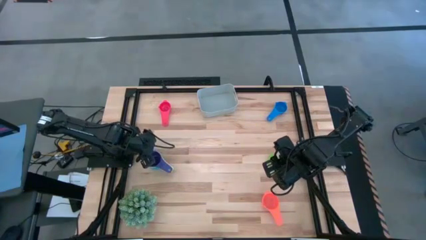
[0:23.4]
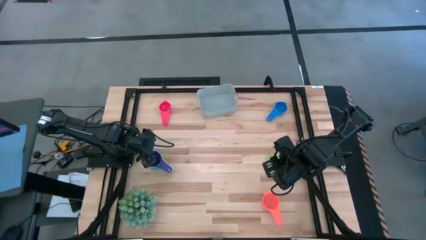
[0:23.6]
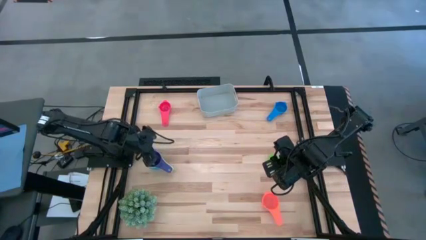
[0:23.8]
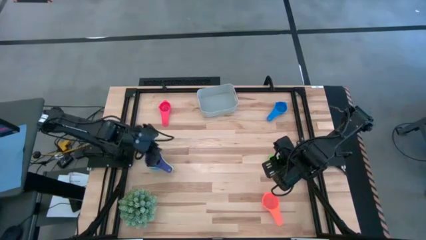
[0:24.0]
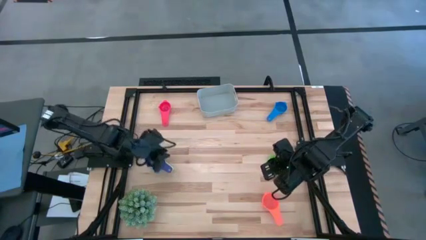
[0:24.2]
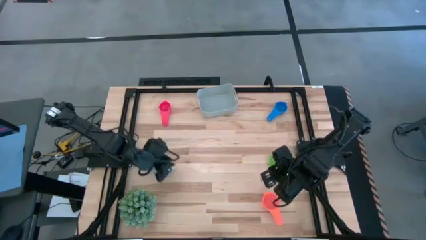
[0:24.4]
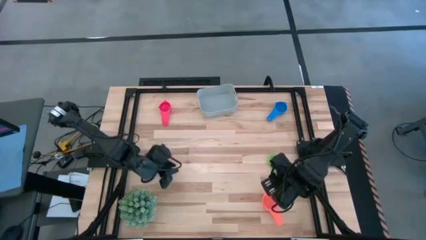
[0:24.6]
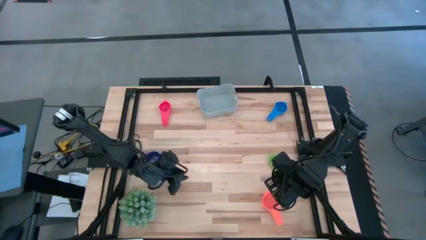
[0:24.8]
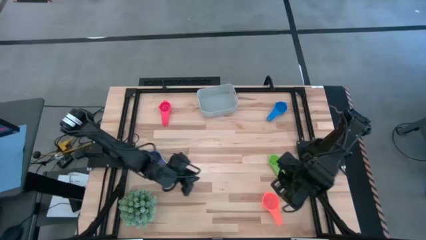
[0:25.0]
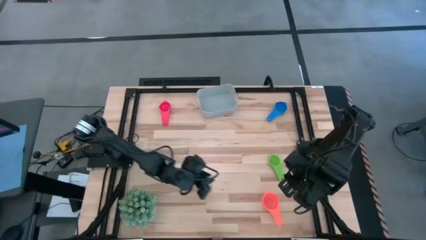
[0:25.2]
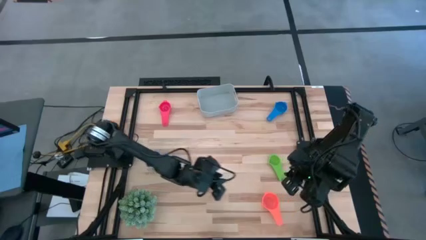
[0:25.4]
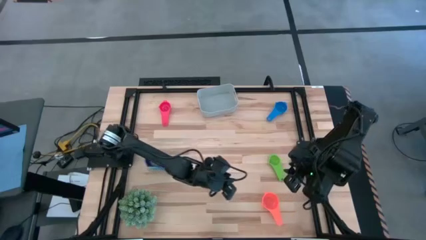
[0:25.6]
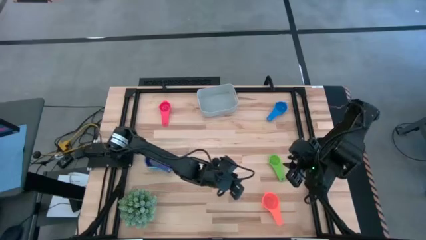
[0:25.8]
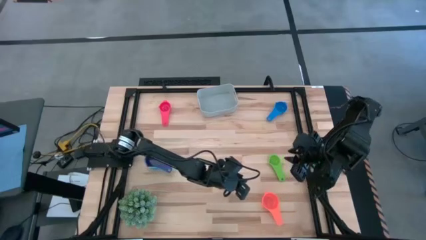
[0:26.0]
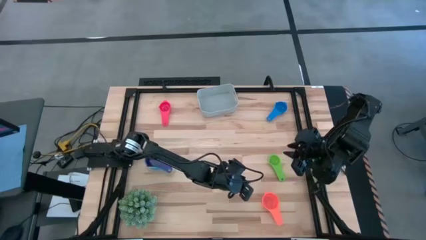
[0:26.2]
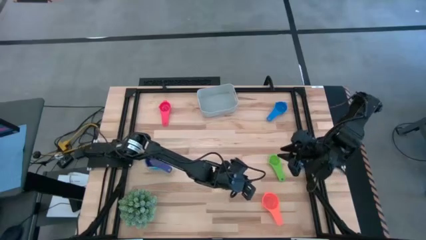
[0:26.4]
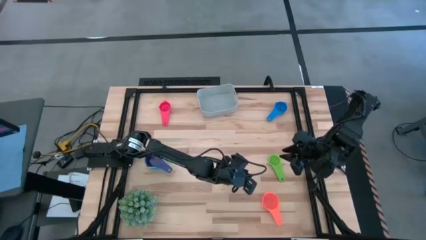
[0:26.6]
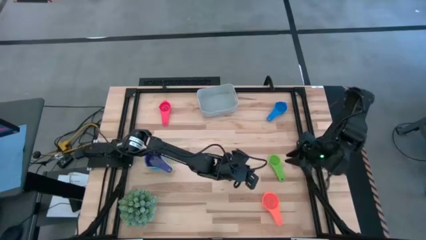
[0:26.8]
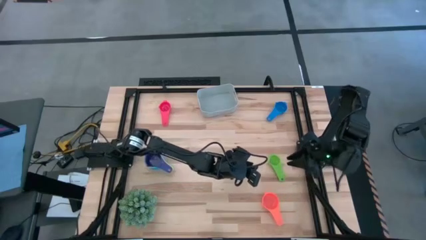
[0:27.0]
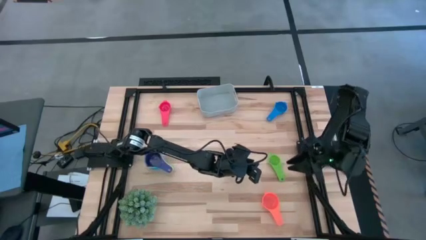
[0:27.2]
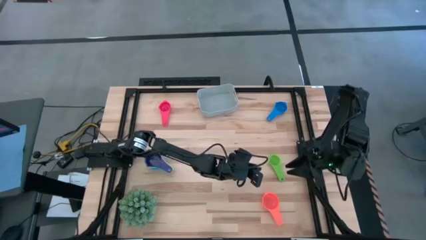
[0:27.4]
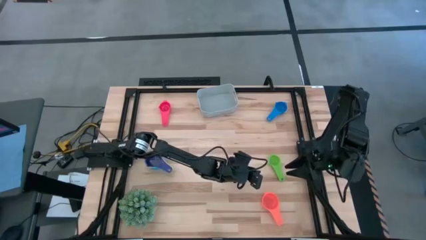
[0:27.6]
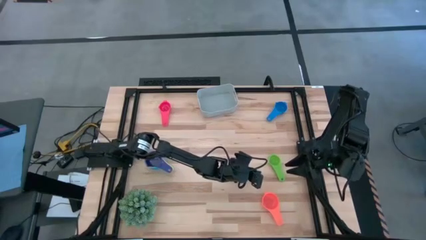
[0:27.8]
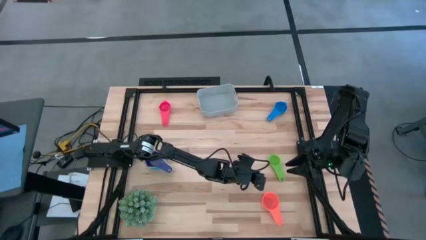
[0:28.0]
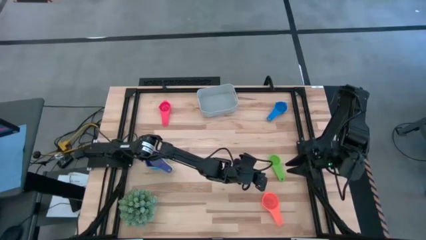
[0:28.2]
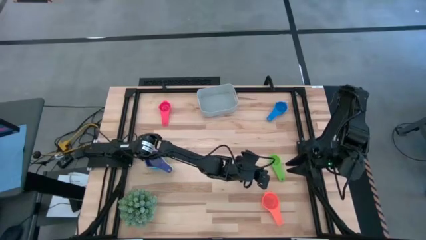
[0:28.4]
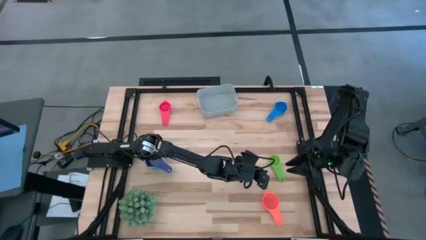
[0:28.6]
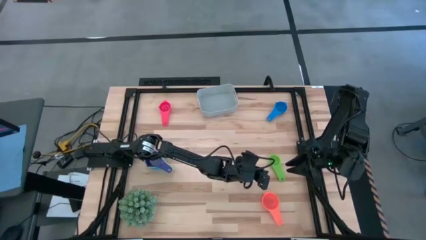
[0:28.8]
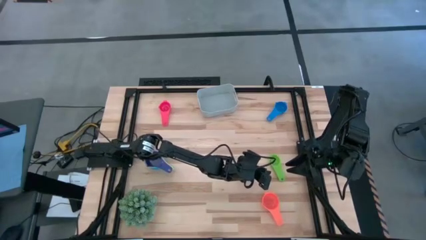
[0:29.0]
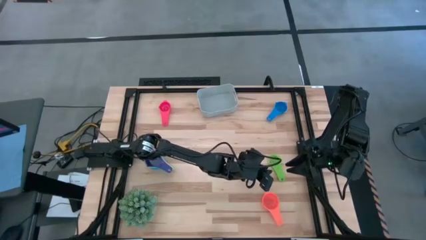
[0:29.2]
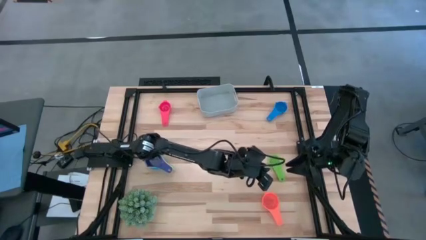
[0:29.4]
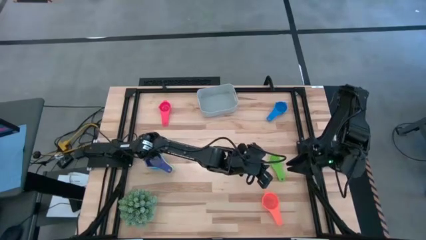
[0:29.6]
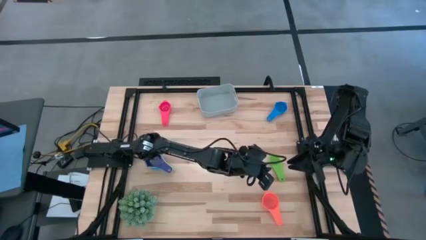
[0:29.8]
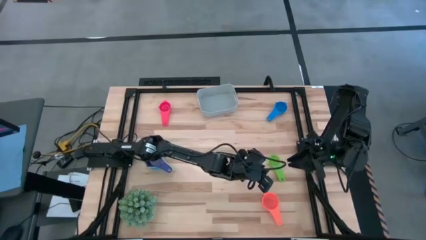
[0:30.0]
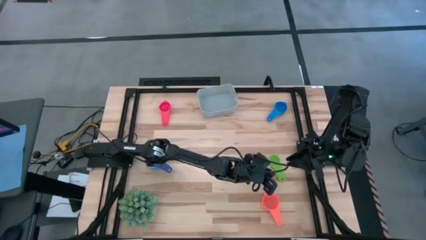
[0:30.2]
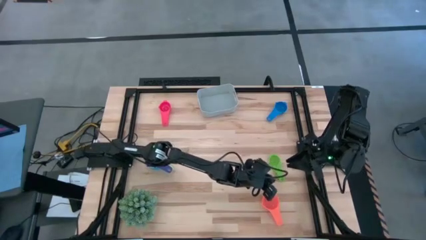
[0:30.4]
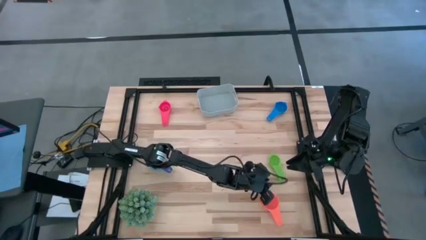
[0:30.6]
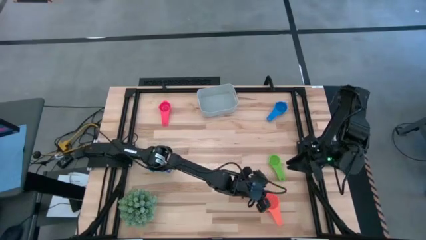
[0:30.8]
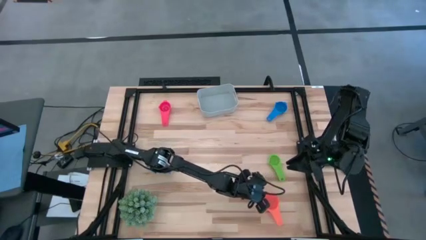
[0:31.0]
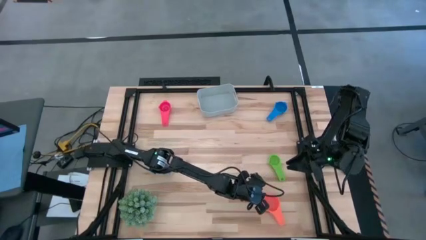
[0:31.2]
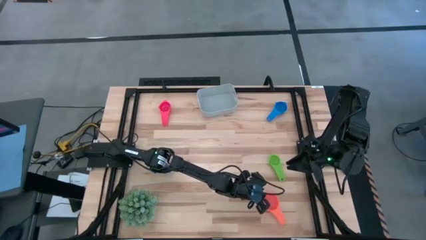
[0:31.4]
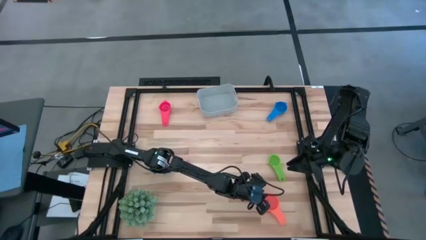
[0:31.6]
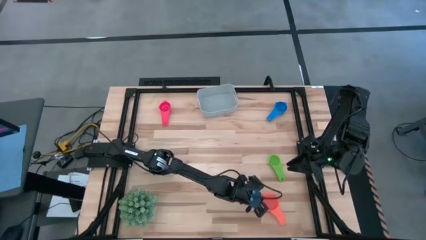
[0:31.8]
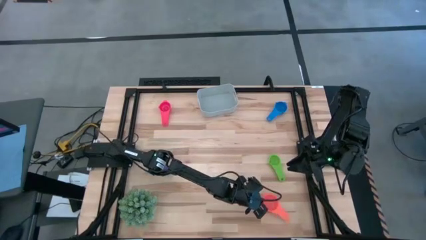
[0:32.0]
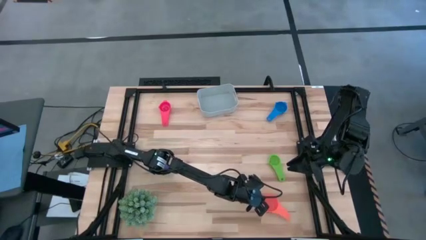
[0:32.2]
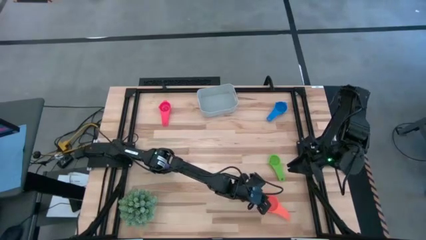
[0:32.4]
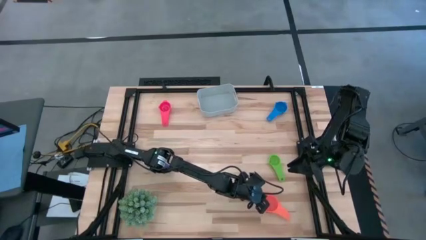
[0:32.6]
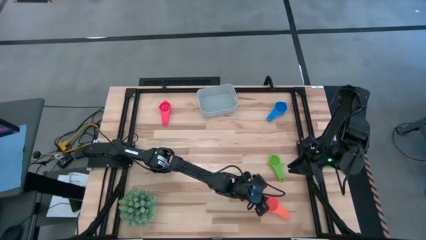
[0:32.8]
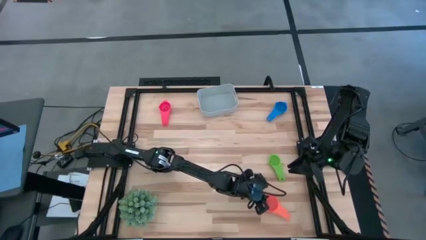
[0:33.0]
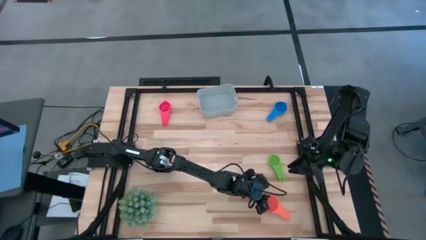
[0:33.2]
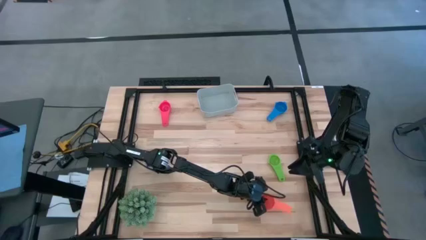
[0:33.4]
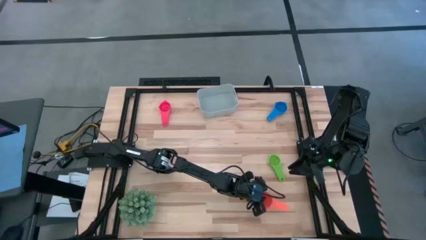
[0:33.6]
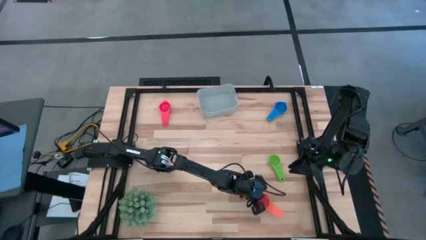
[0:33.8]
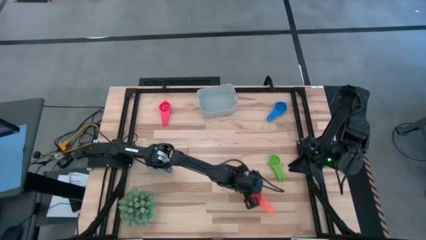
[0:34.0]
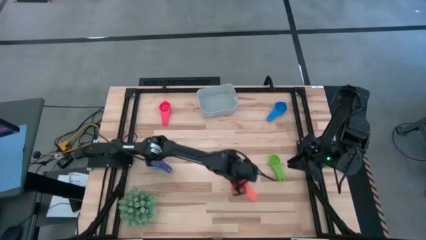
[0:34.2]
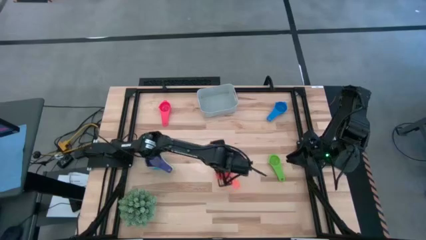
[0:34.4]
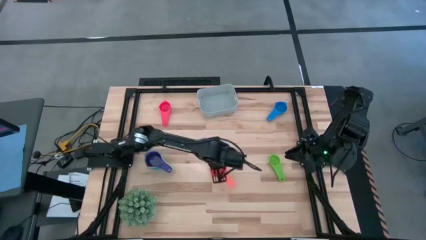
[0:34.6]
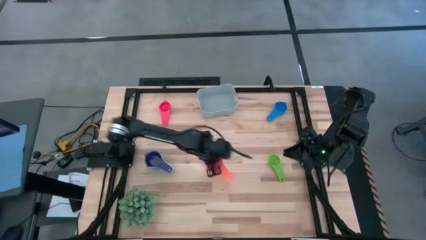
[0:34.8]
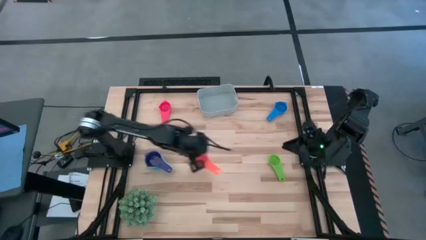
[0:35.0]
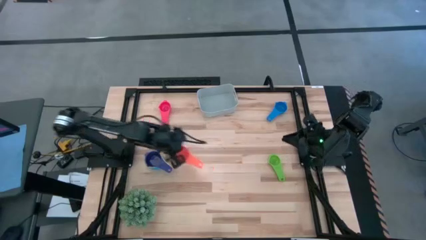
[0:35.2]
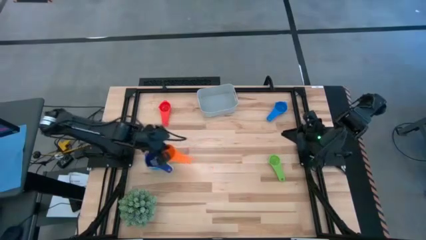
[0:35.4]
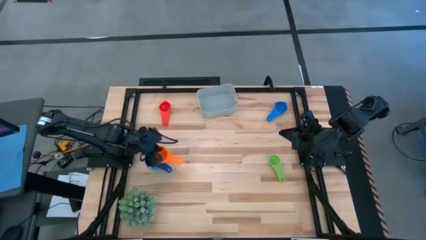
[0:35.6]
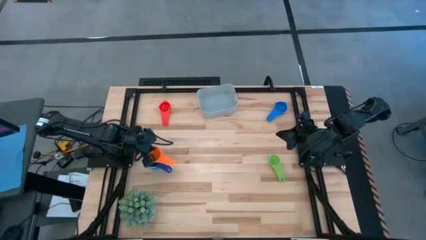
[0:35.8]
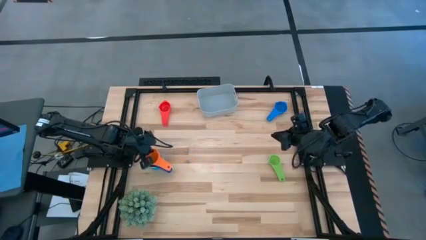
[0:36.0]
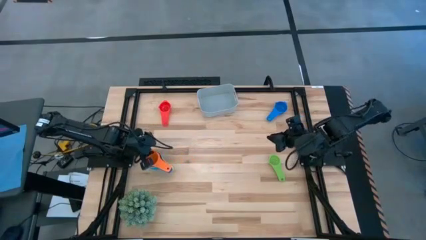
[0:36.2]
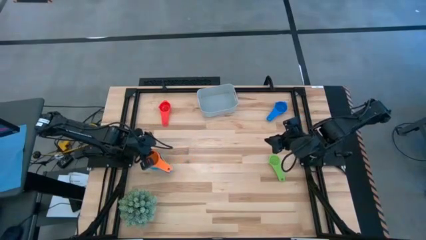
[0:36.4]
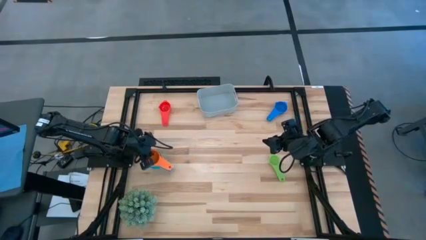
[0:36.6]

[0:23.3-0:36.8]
Task: Nest measuring cups in basket
Stack the orange measuring cup on the violet measuring cup

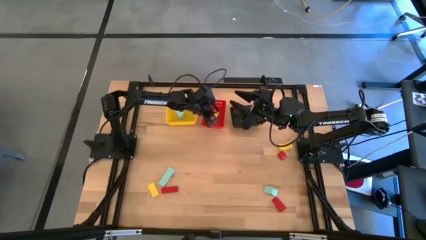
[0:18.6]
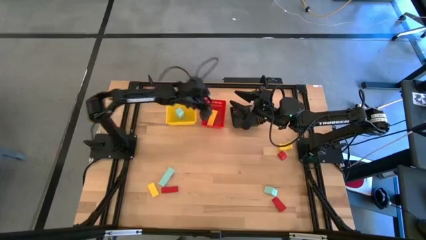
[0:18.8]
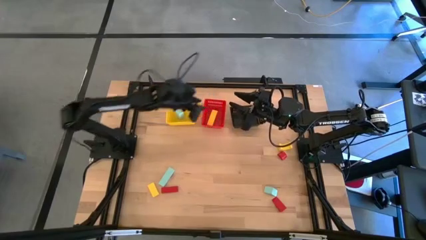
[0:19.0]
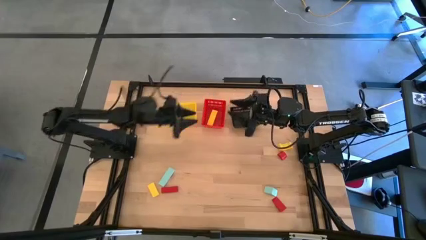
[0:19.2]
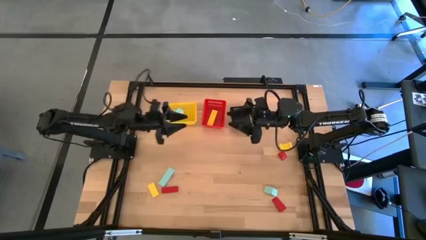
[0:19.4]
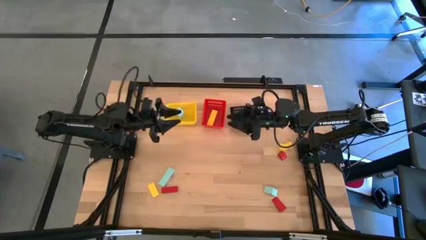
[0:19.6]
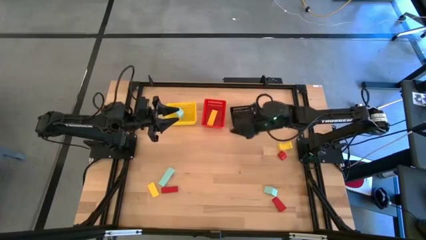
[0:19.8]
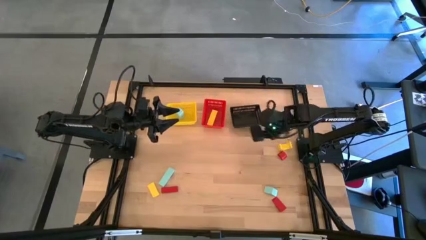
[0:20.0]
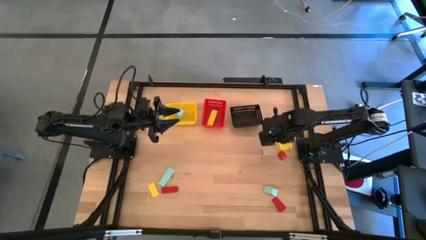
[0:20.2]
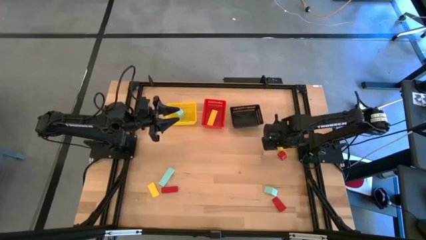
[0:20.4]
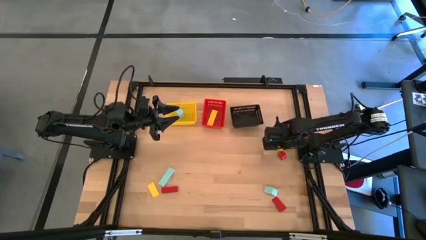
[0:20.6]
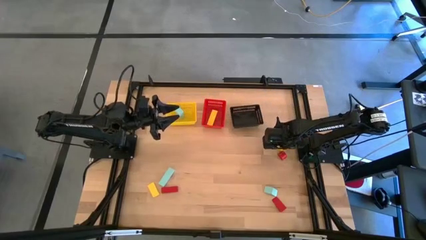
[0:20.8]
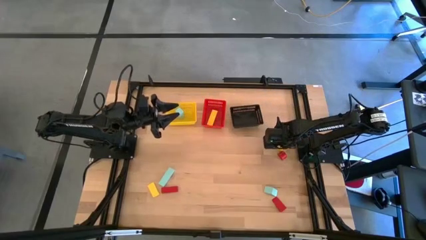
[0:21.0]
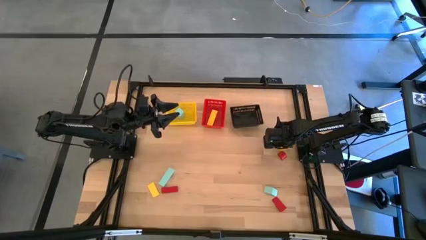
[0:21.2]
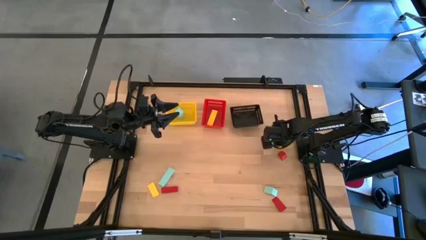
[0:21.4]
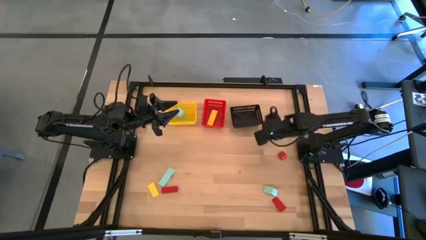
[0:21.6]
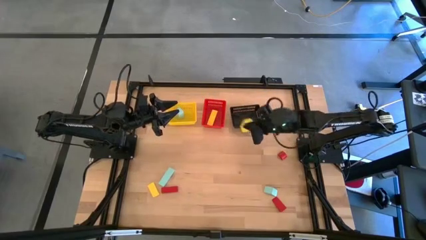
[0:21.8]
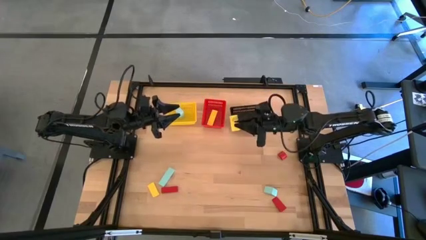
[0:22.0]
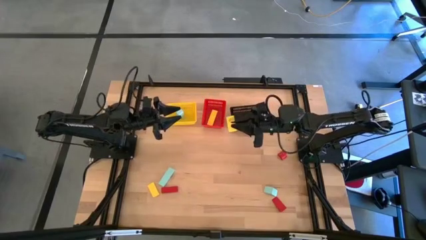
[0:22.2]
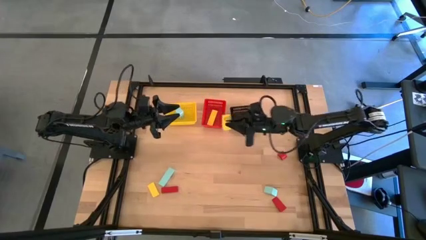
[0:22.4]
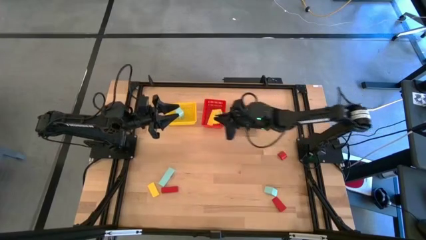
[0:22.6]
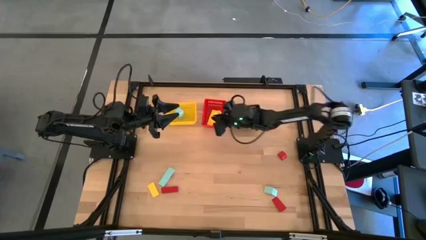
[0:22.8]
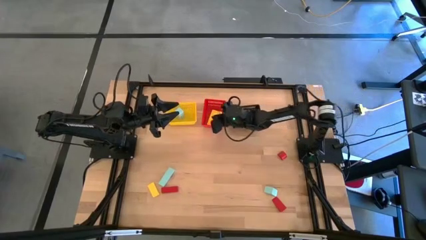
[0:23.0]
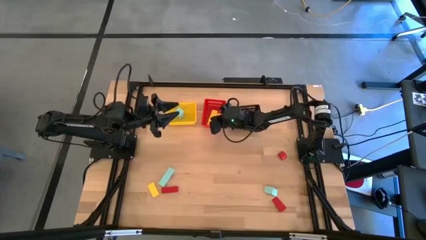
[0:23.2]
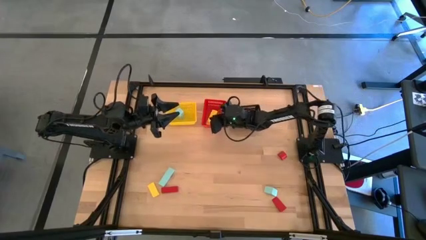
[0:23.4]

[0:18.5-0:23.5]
Task: Sort & place blocks by color
Put the right yellow block into the red basket
